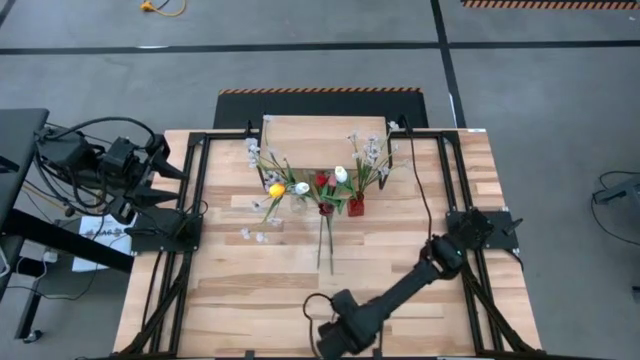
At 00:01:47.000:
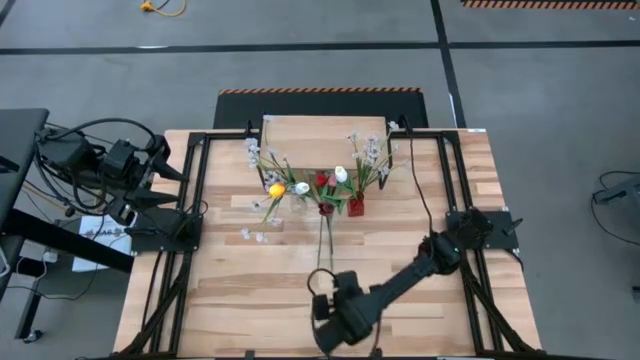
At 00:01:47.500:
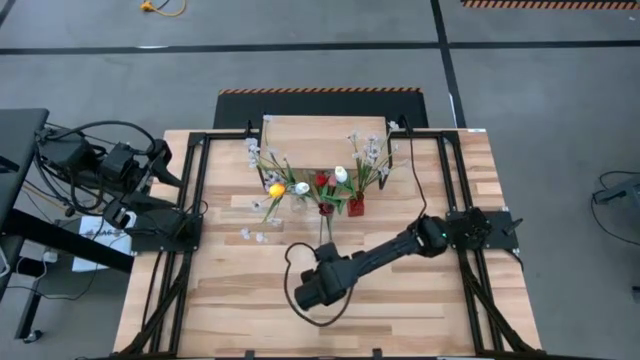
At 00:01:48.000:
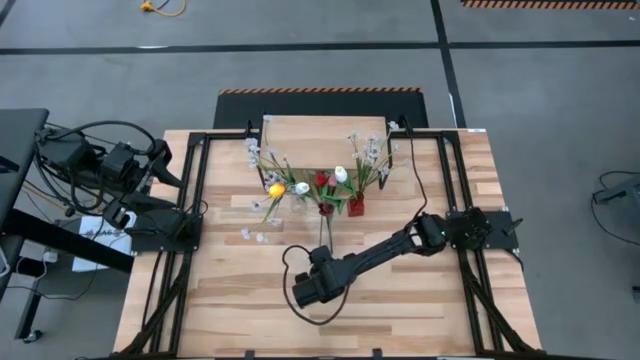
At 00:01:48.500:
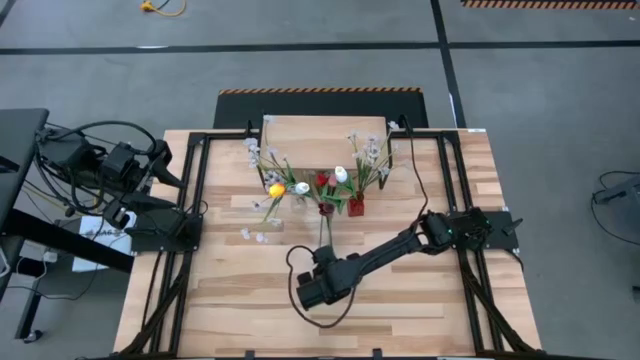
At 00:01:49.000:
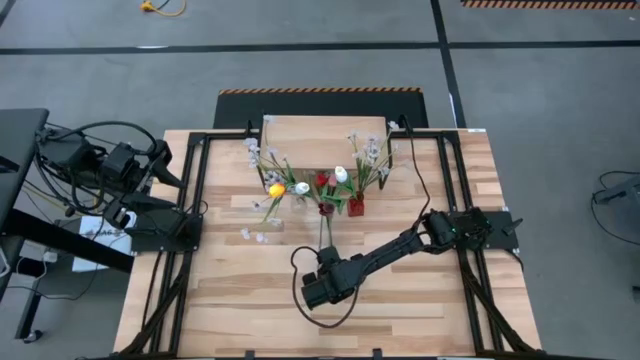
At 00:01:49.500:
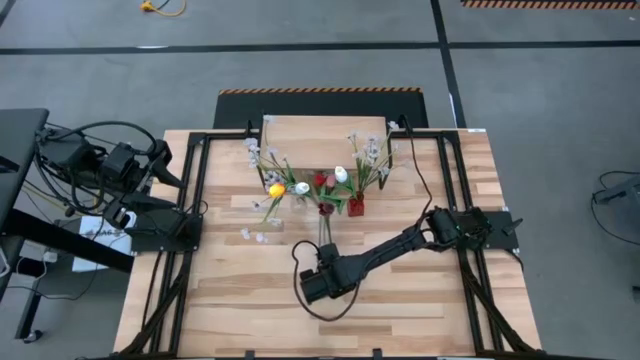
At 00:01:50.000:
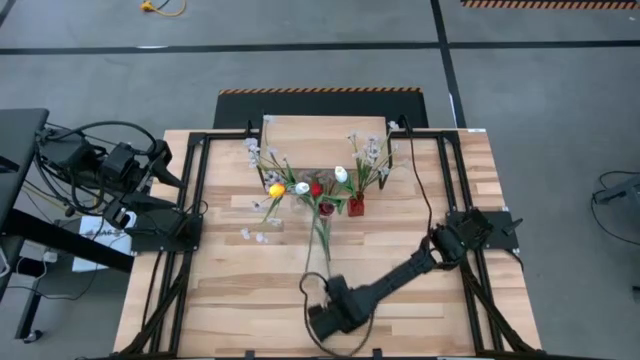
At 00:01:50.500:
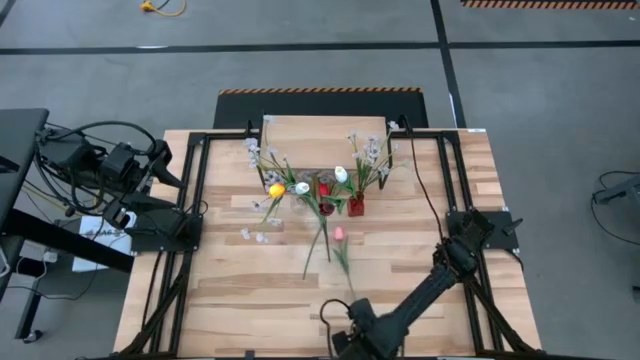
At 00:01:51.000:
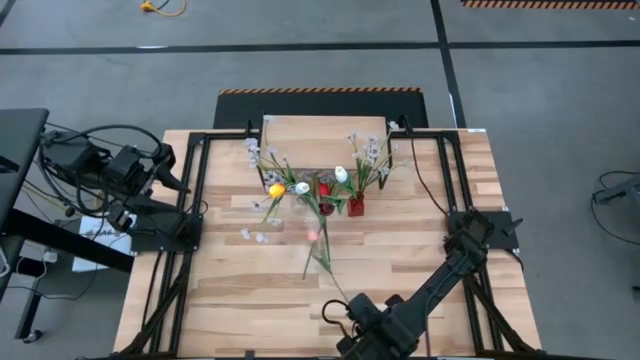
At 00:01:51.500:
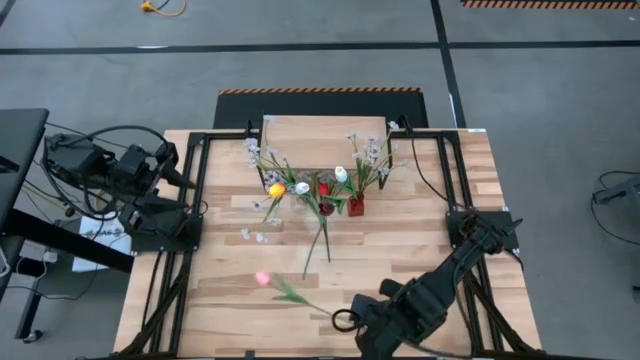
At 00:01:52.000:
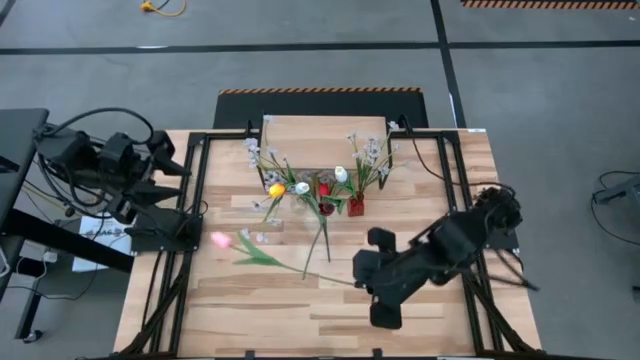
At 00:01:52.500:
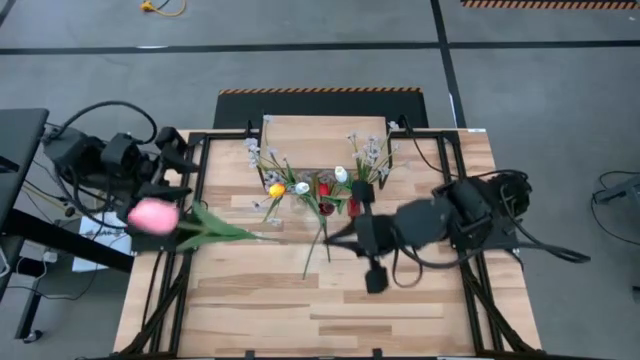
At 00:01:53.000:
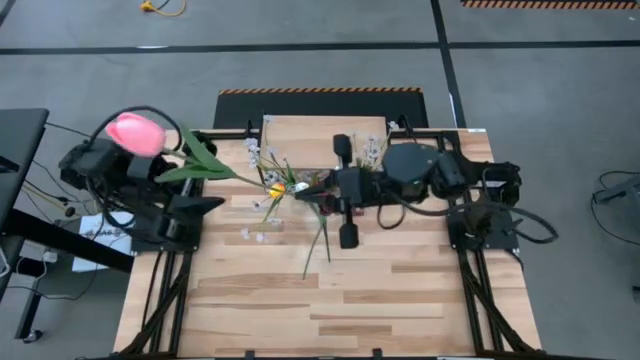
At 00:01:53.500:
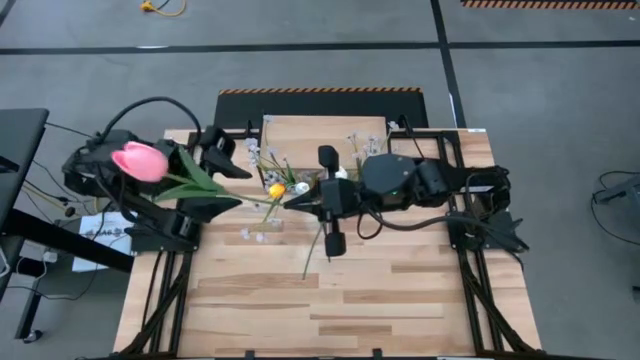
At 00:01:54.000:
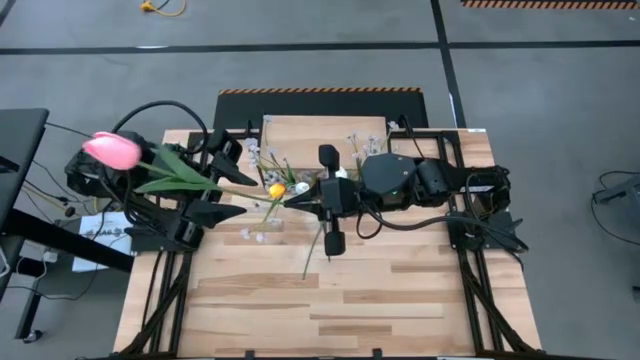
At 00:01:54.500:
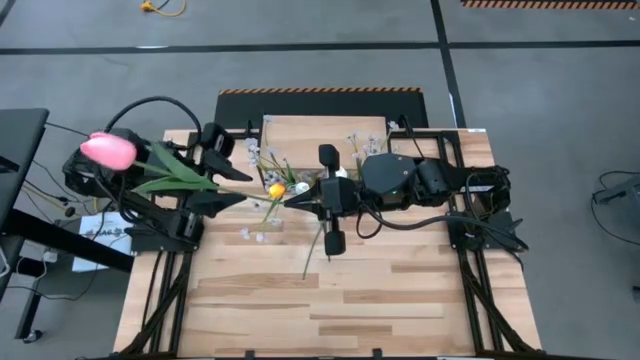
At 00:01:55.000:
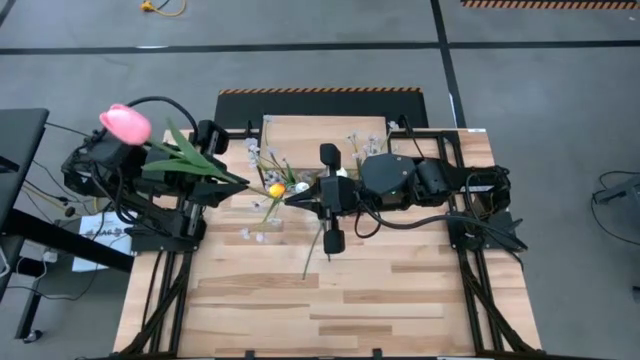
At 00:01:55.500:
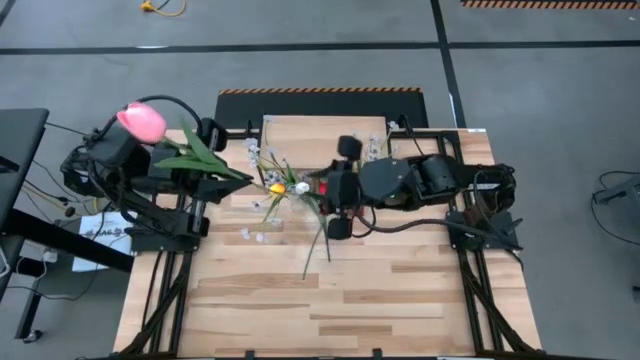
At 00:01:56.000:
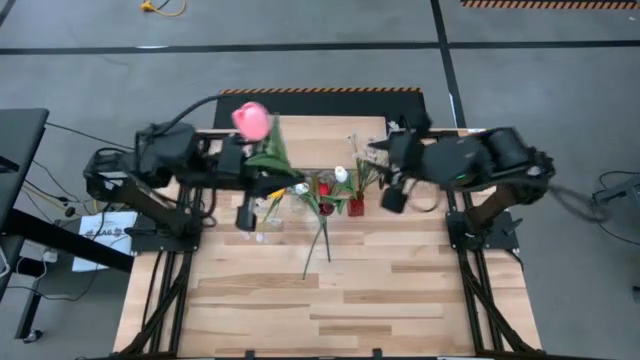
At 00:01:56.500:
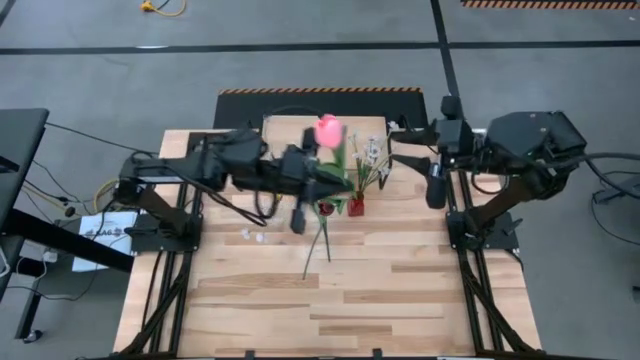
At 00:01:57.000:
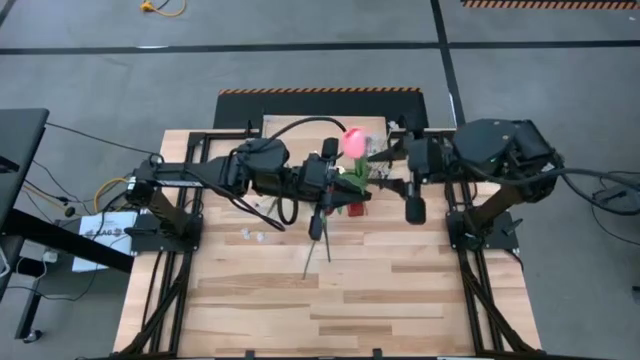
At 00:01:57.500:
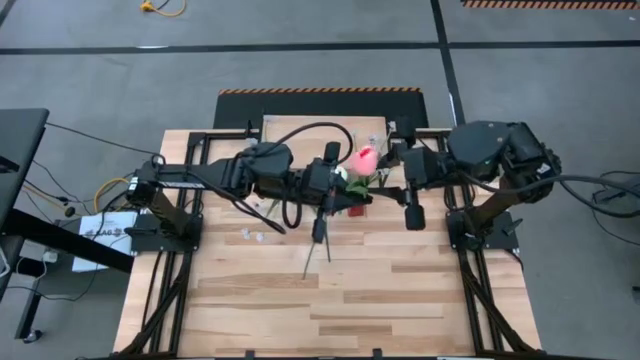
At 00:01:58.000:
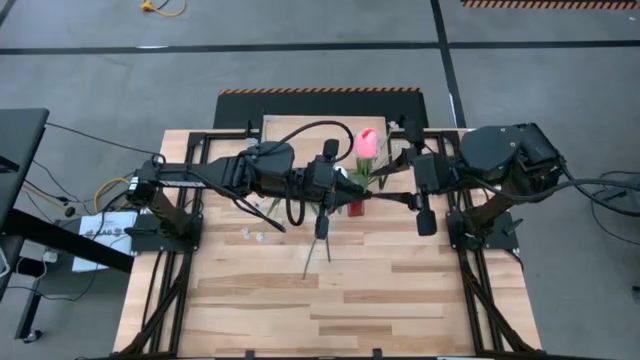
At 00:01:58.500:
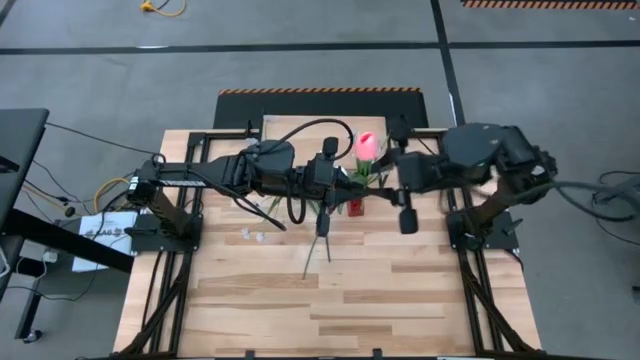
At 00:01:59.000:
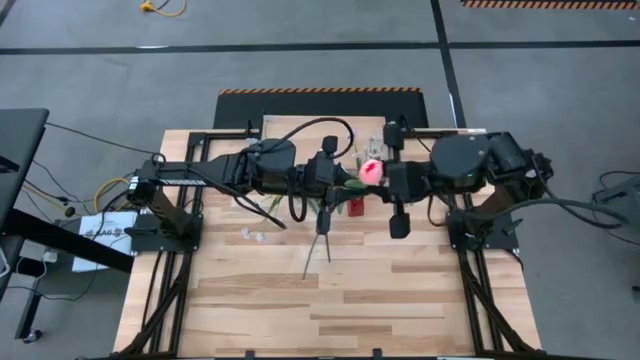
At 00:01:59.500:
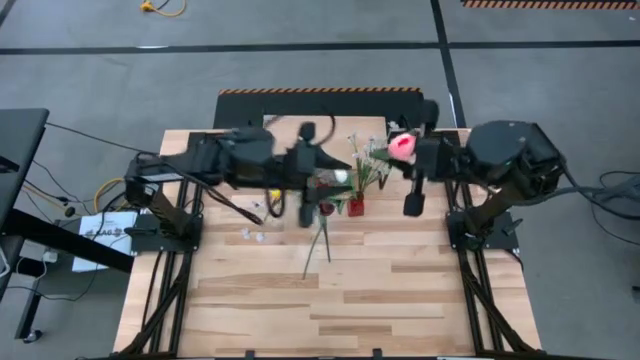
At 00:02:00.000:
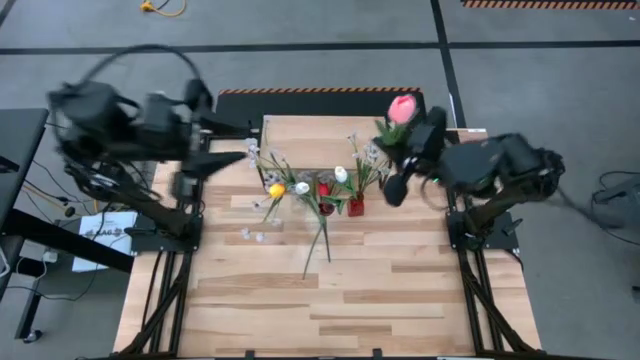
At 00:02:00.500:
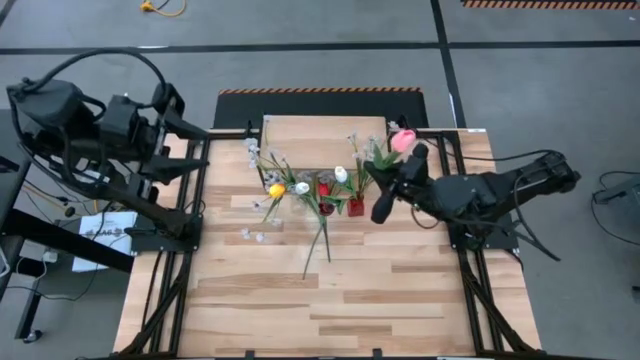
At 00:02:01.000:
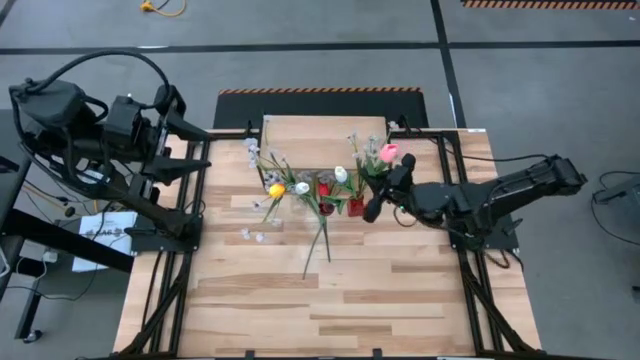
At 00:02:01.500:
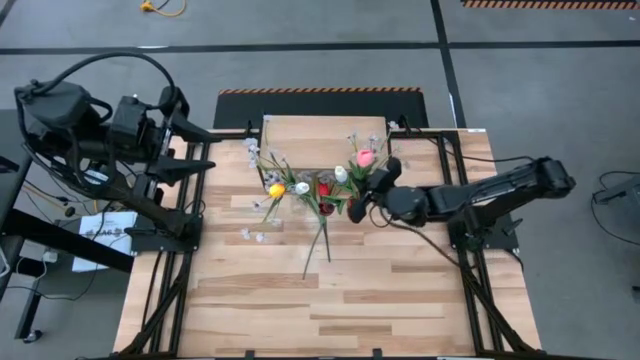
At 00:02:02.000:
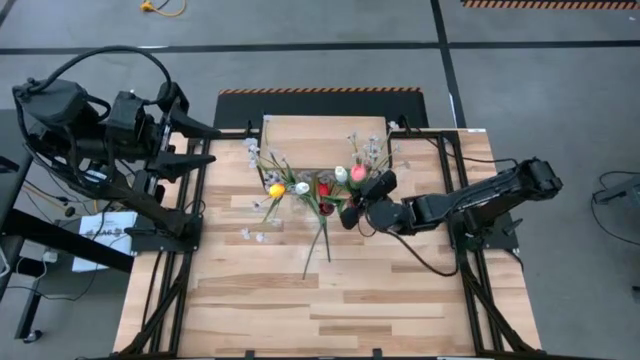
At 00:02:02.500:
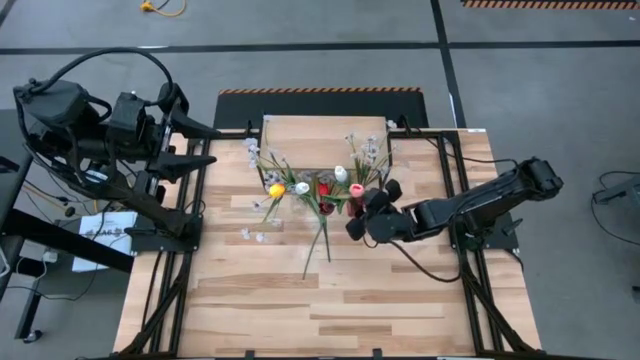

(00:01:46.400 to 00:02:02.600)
Task: Pick and place flowers into a vace then onto a shelf
Put the pink flower into the red vase

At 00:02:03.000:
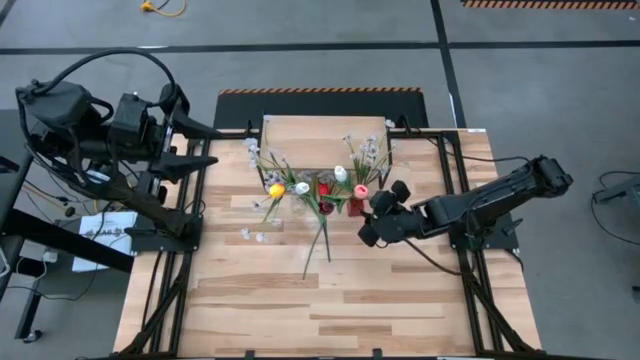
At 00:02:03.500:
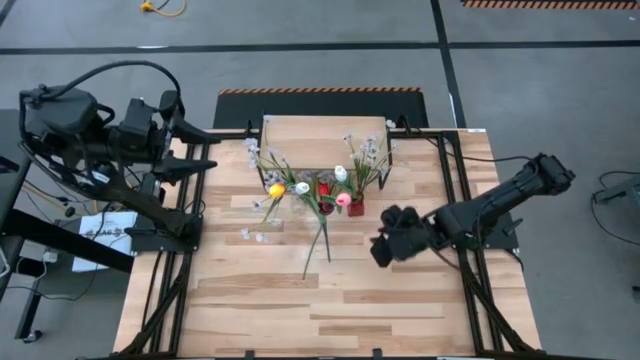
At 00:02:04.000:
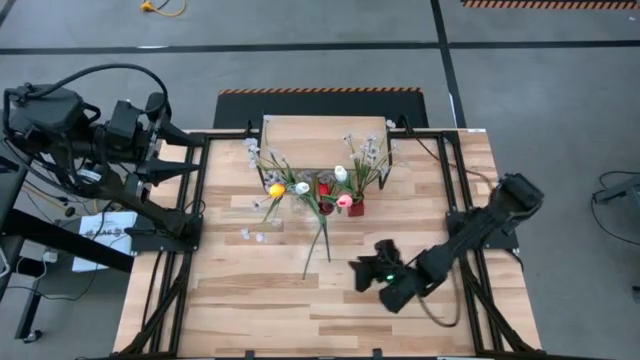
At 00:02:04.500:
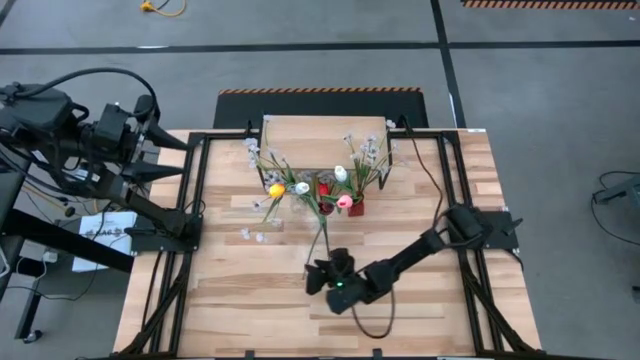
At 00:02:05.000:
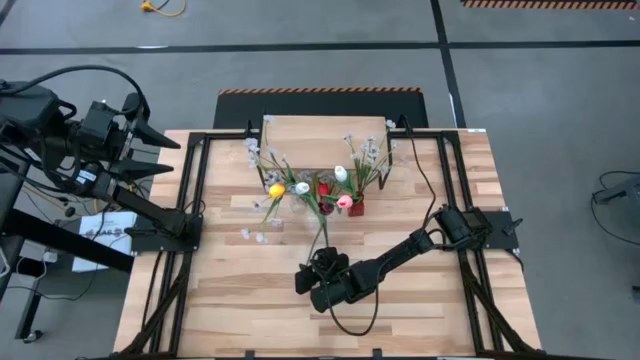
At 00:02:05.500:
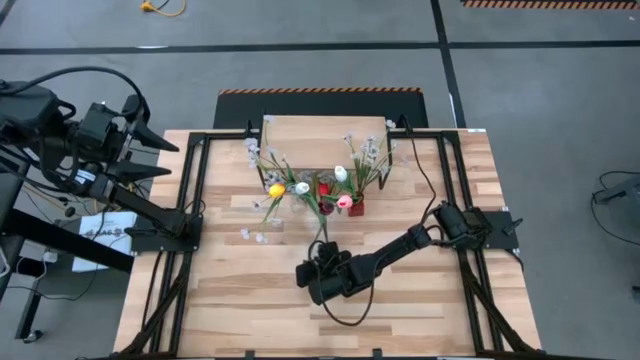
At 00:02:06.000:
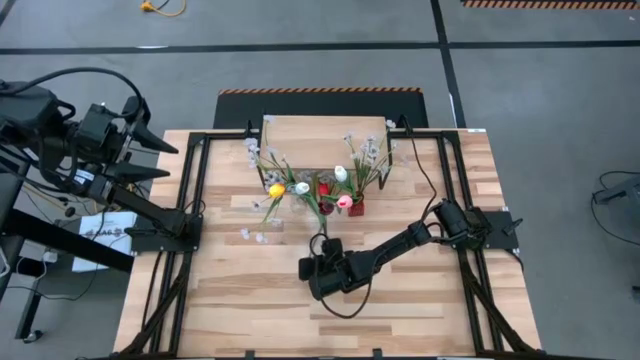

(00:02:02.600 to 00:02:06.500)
Put the red flower into the transparent vase
